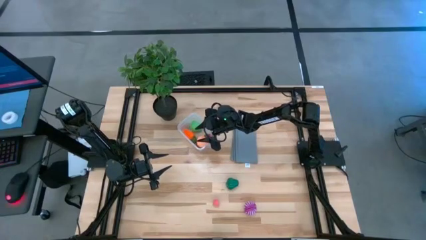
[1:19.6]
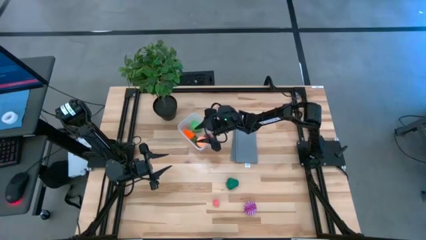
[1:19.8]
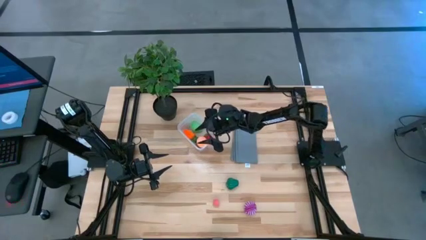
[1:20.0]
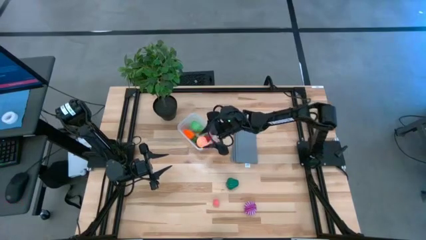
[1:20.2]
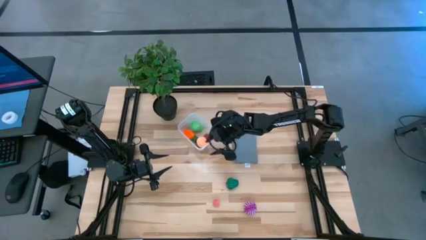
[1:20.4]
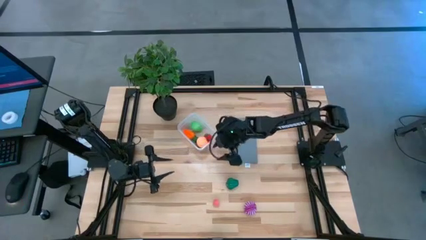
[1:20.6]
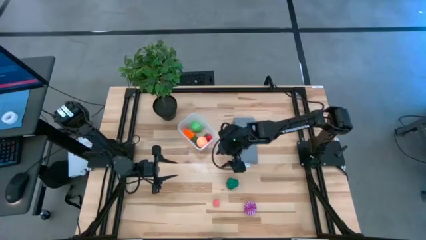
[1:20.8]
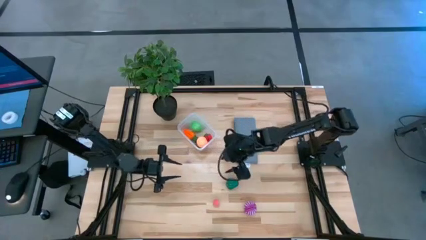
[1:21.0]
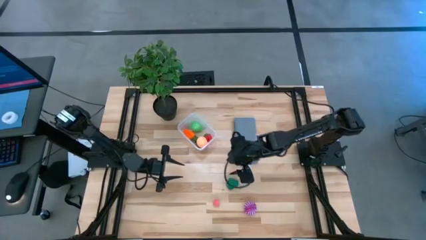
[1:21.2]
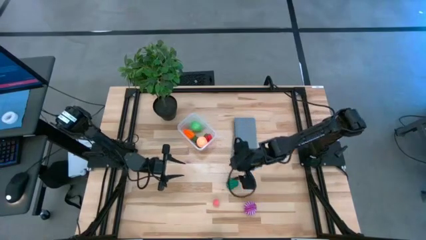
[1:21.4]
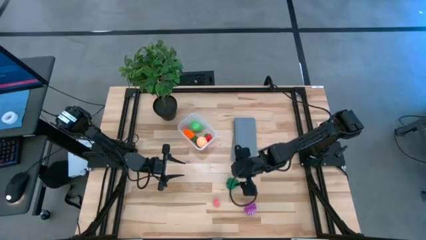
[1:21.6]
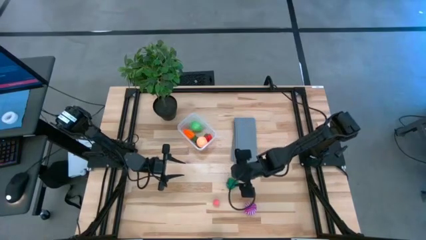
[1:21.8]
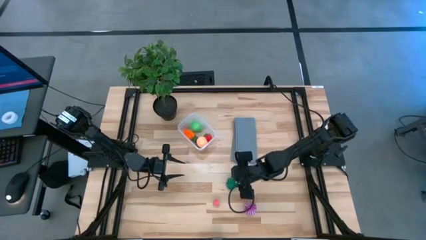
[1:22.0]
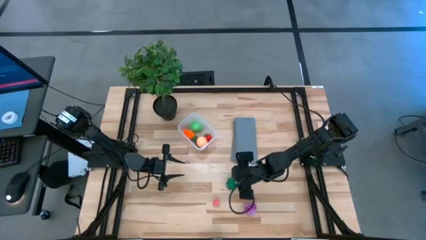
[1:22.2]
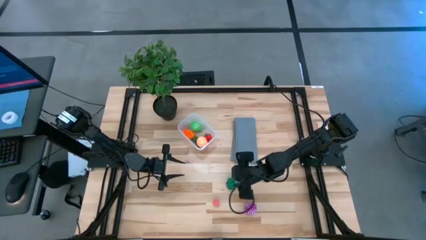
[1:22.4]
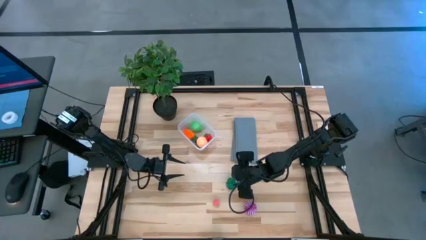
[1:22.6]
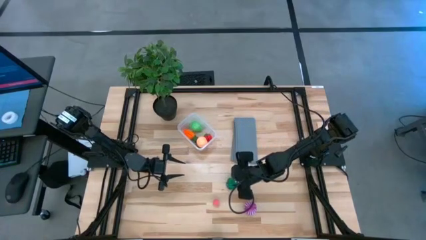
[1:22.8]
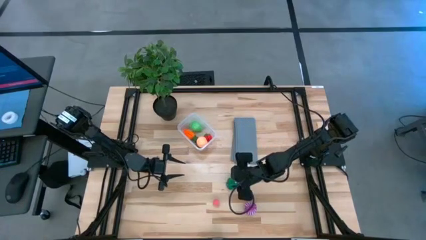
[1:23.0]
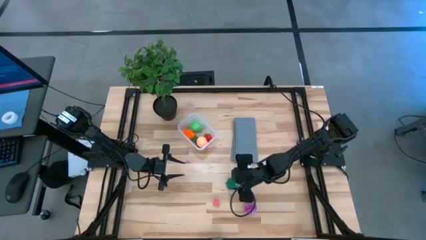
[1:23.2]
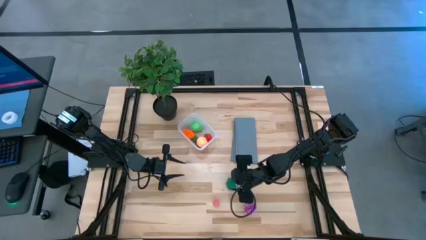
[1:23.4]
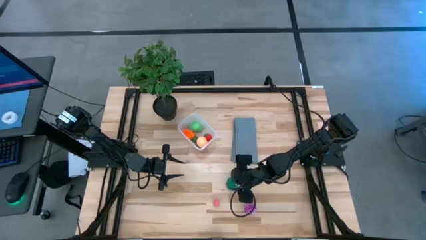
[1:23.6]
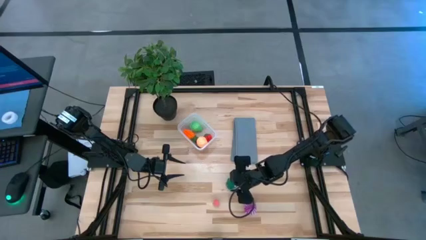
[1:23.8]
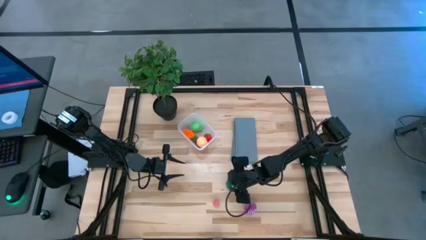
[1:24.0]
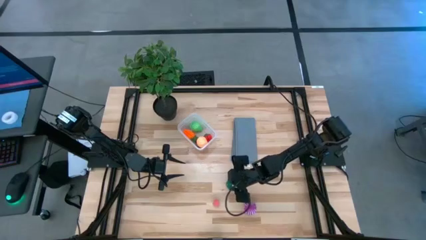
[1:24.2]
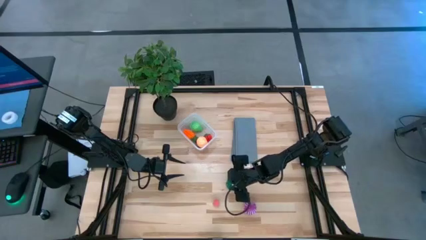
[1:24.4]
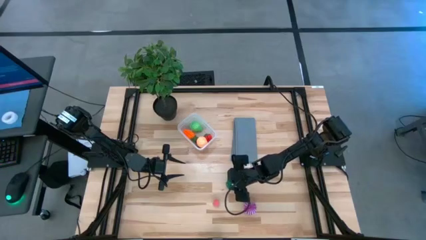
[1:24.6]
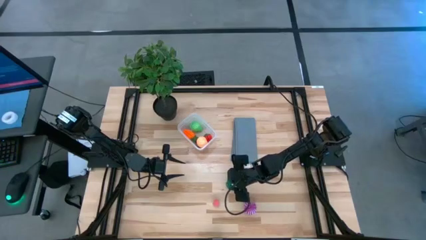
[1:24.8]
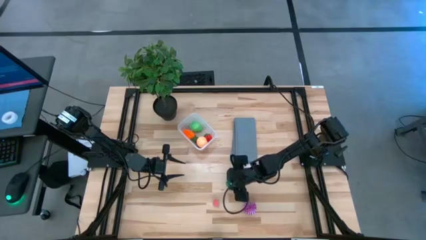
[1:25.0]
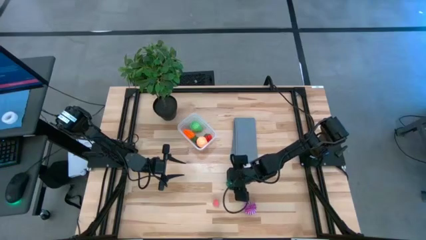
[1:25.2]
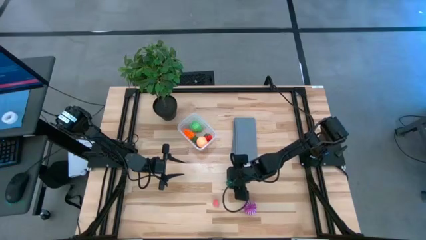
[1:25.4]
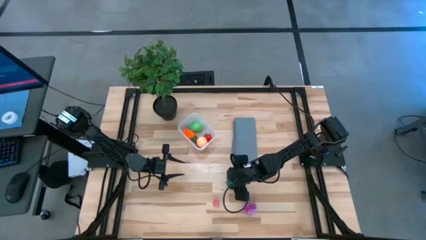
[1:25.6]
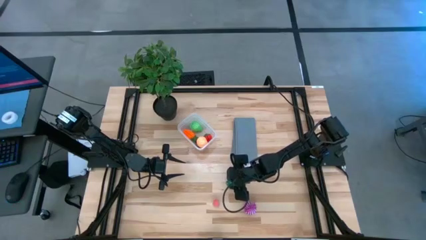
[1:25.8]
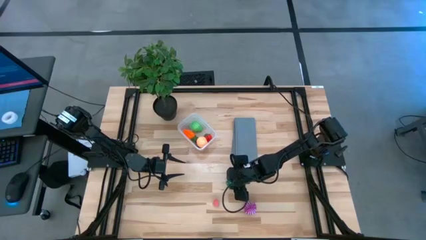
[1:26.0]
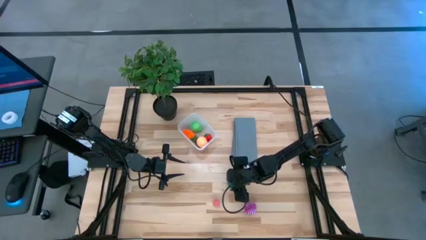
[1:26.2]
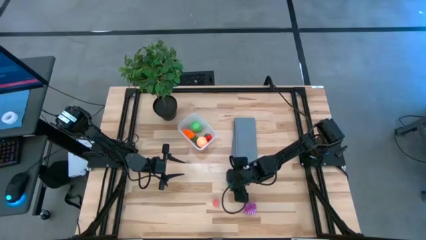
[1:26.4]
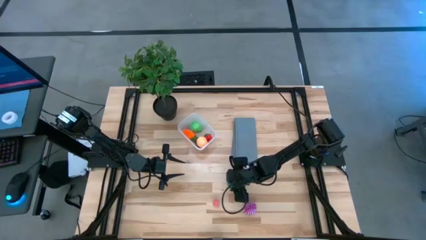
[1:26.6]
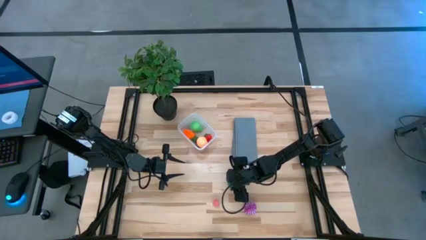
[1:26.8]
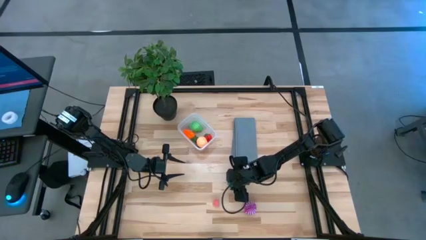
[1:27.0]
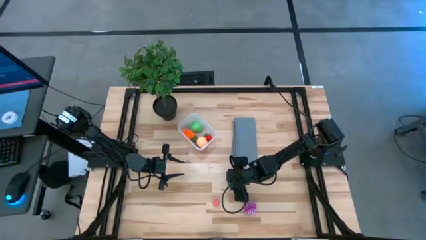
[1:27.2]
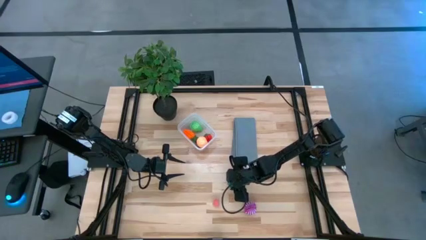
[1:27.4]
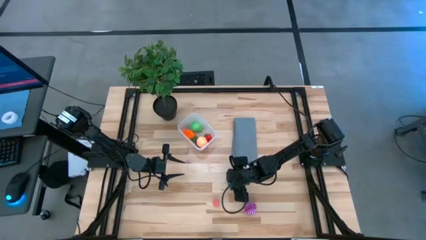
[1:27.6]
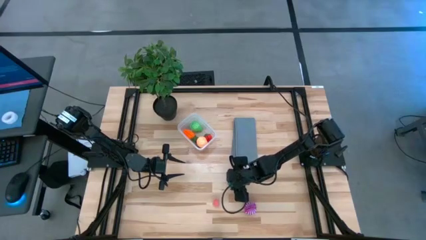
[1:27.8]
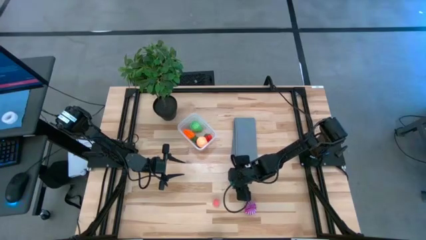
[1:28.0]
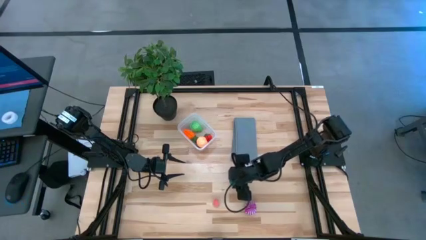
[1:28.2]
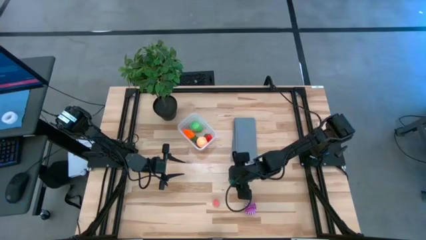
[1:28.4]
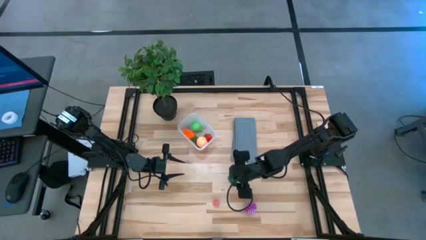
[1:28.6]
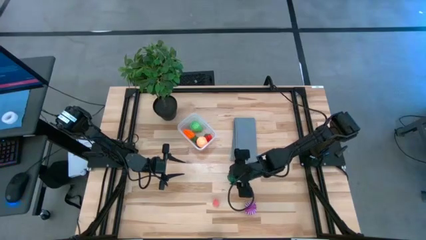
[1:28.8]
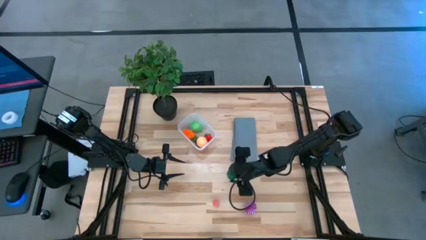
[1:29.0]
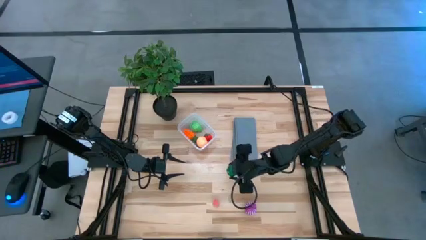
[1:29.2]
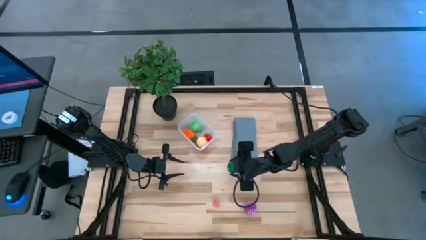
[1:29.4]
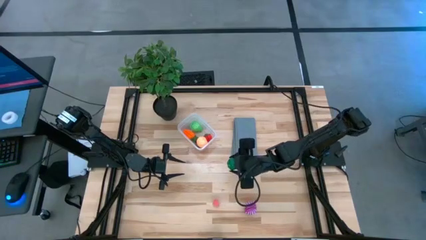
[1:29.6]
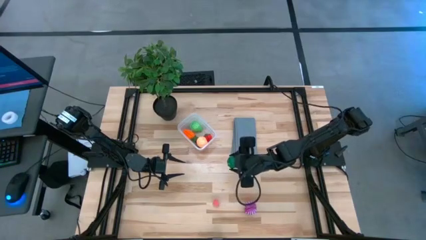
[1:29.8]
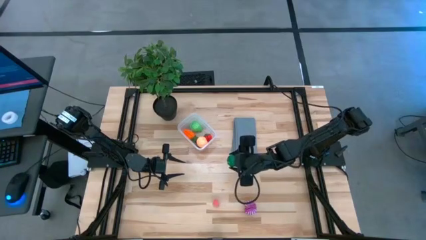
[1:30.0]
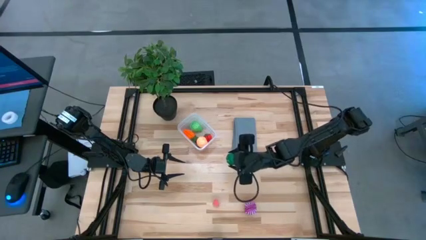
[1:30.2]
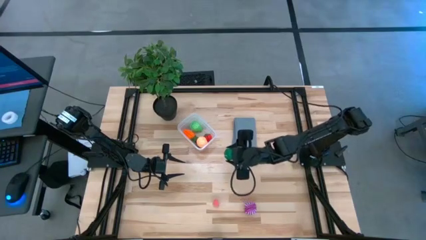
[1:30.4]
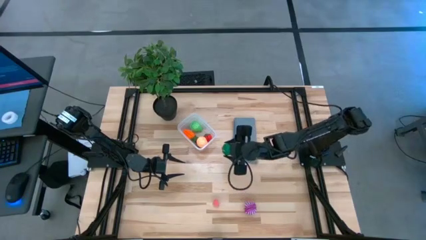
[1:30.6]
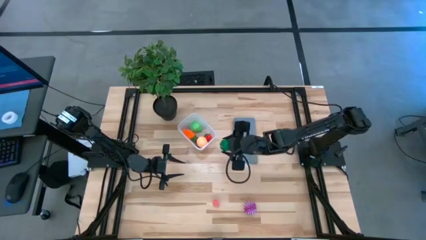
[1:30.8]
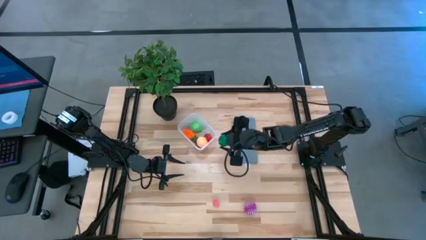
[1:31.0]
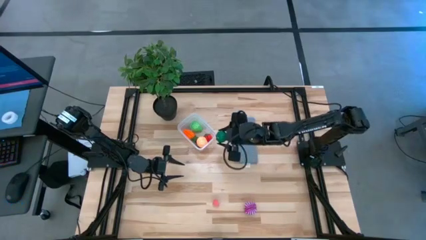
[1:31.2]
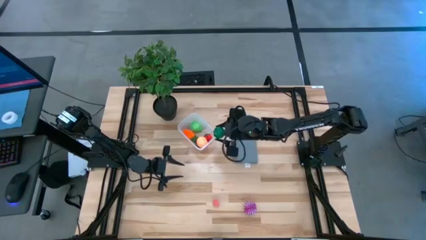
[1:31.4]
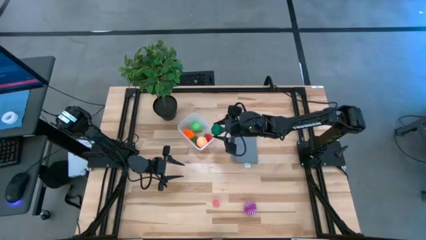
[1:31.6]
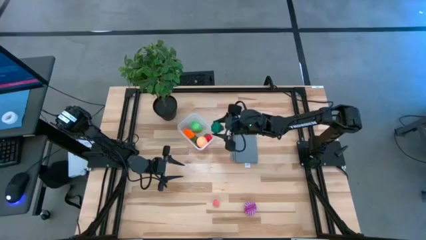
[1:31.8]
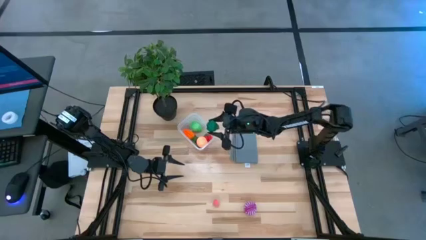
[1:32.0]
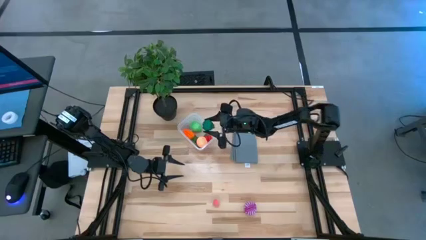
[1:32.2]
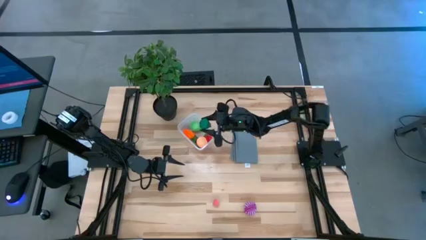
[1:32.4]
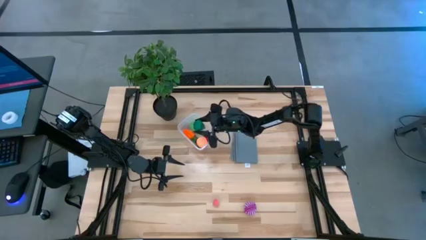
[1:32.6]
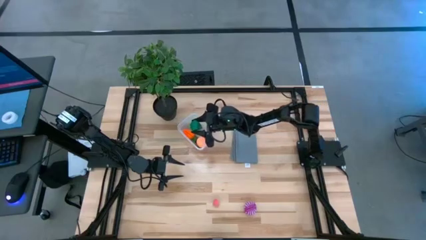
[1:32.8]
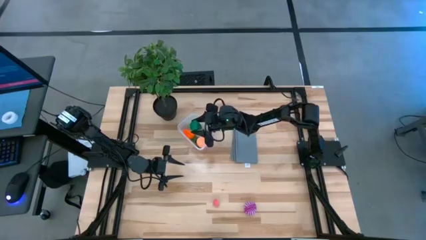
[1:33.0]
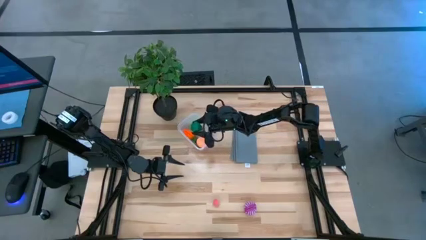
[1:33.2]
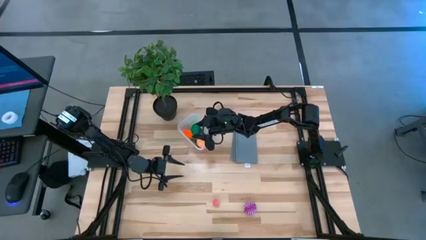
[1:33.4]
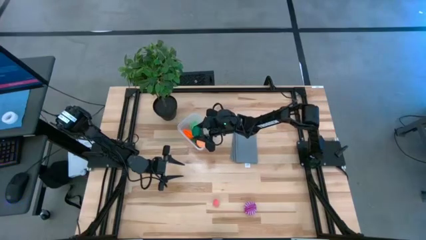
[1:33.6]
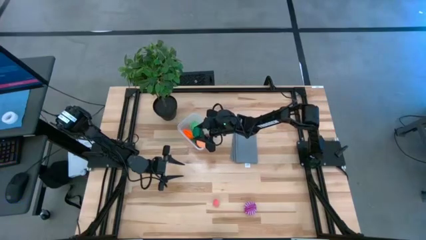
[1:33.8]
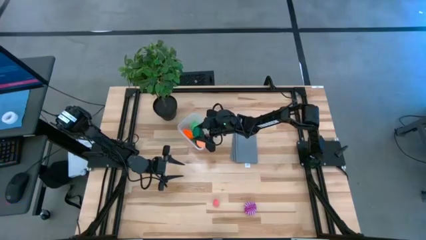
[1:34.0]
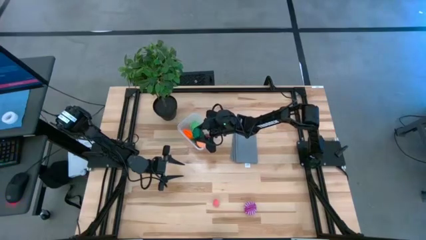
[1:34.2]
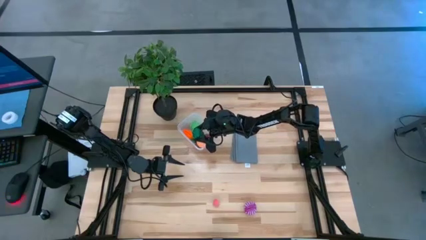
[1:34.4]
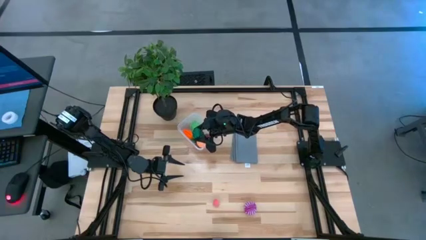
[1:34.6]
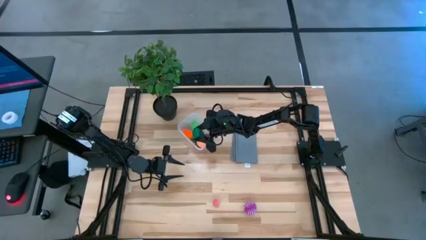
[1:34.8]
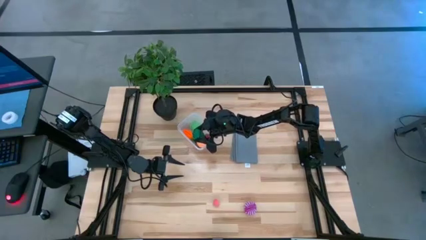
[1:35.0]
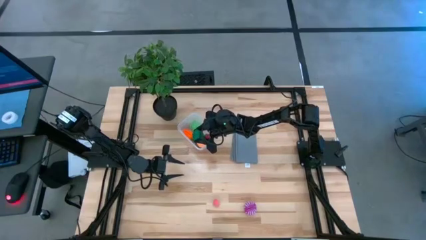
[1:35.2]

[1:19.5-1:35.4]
Task: Pick and placing Produce into tupperware
Put the green bell pepper into the transparent bin
